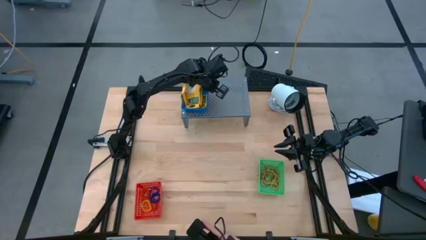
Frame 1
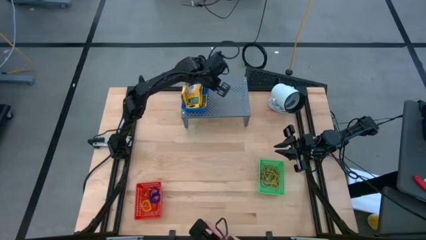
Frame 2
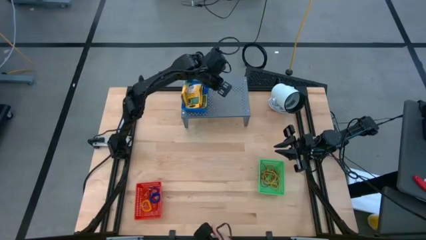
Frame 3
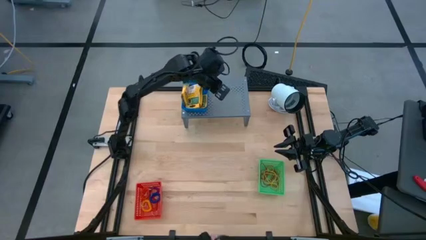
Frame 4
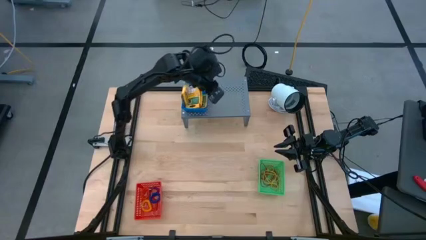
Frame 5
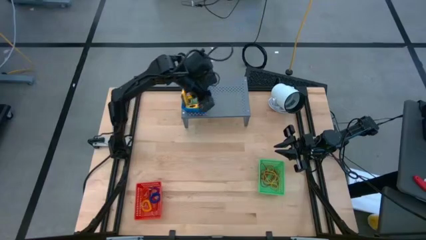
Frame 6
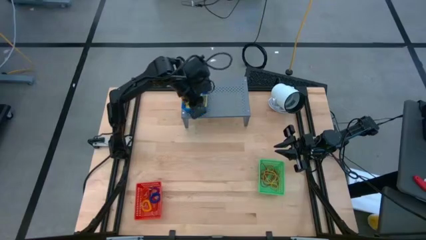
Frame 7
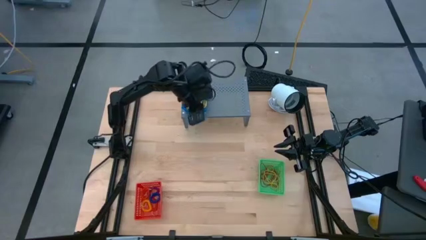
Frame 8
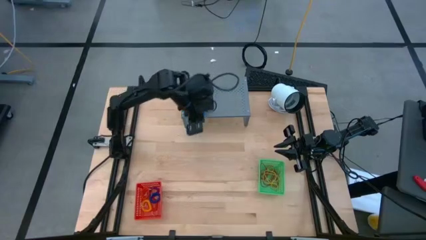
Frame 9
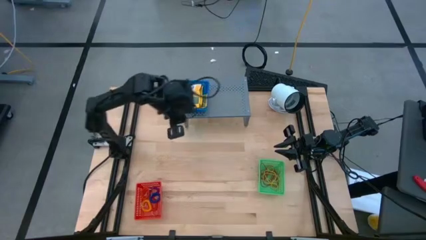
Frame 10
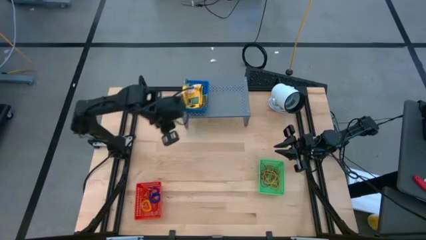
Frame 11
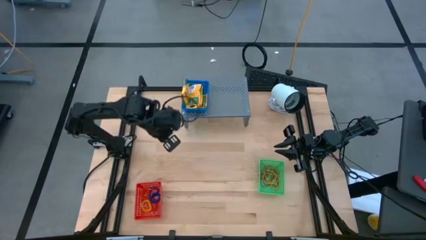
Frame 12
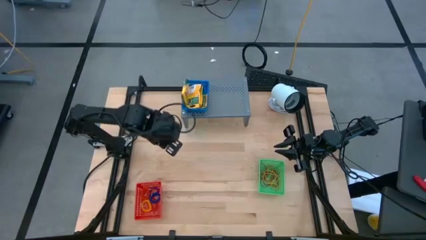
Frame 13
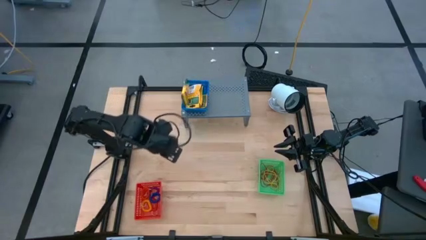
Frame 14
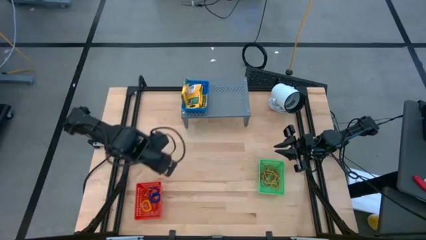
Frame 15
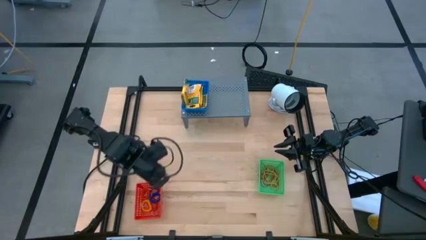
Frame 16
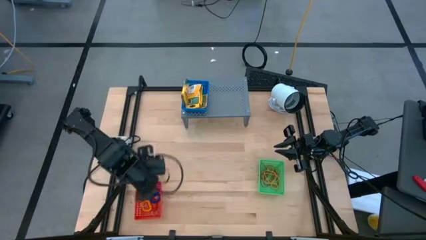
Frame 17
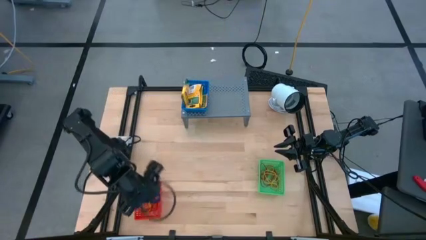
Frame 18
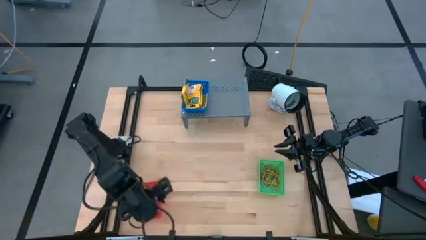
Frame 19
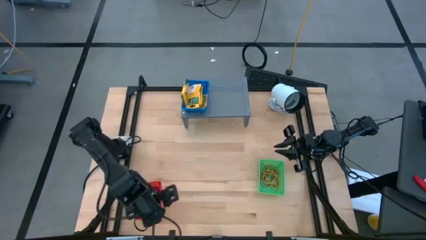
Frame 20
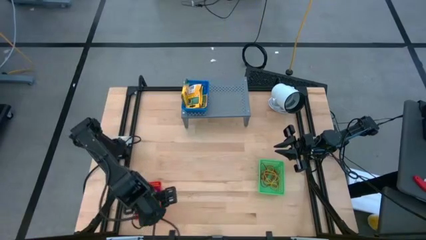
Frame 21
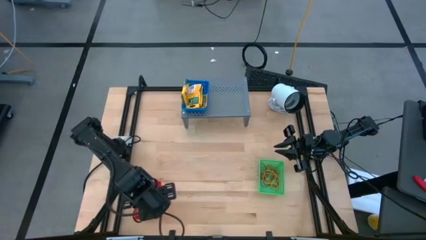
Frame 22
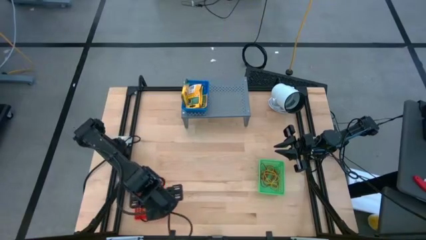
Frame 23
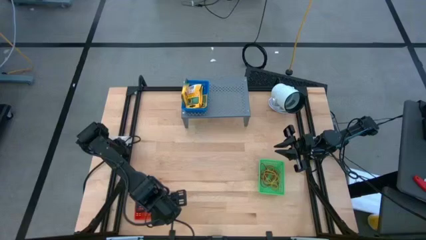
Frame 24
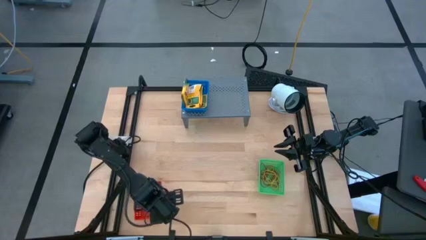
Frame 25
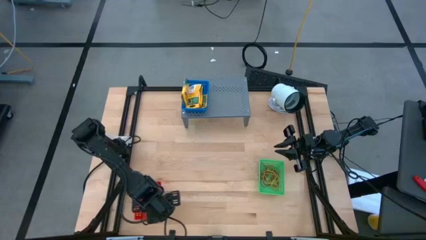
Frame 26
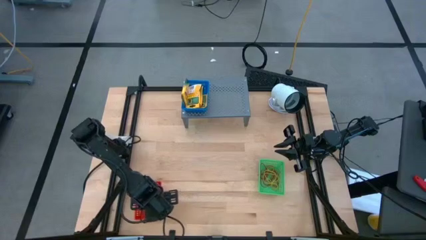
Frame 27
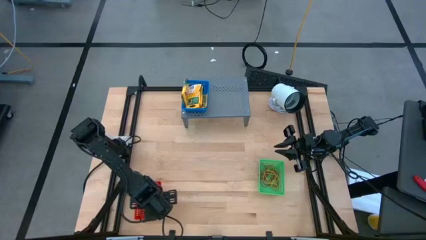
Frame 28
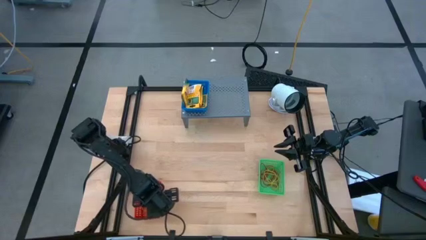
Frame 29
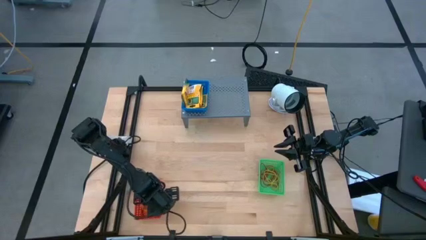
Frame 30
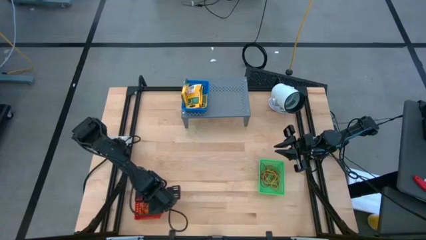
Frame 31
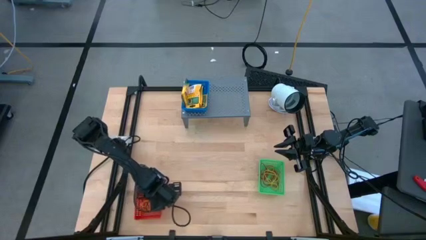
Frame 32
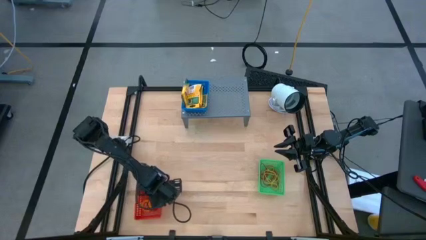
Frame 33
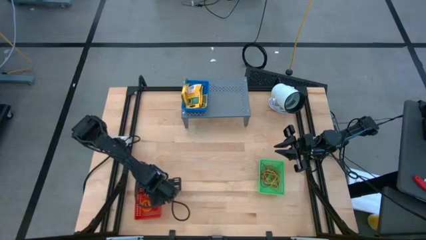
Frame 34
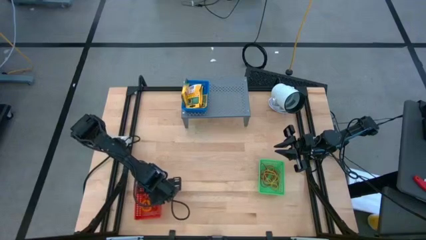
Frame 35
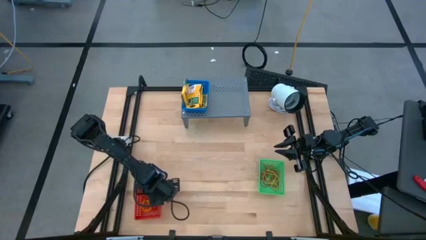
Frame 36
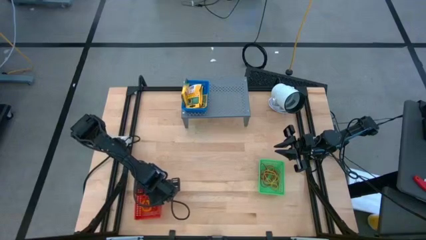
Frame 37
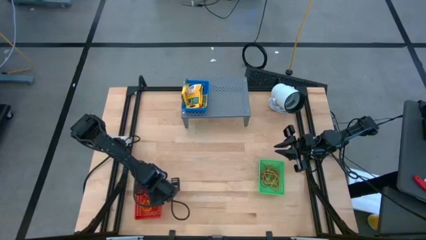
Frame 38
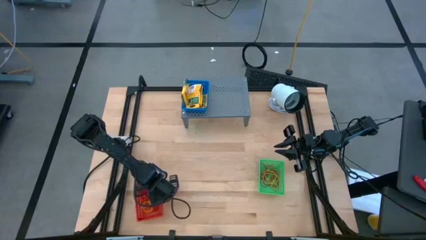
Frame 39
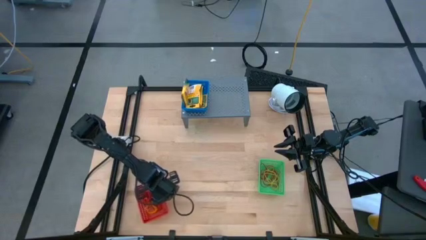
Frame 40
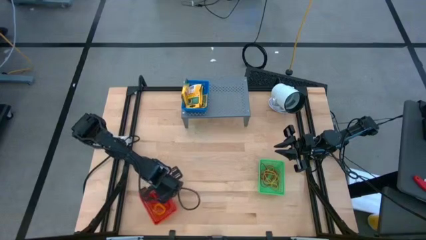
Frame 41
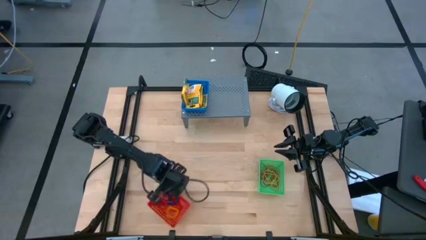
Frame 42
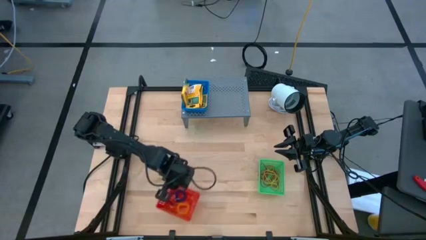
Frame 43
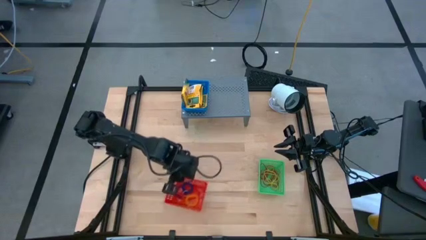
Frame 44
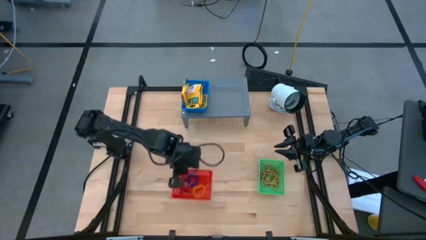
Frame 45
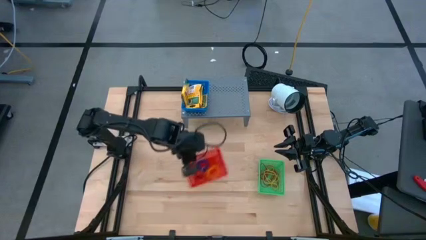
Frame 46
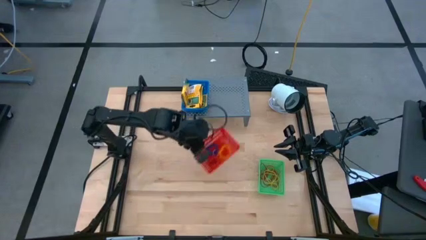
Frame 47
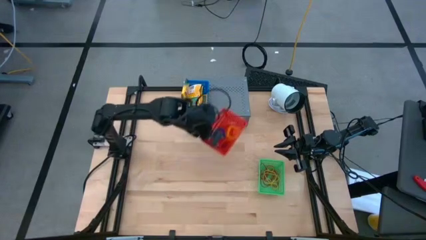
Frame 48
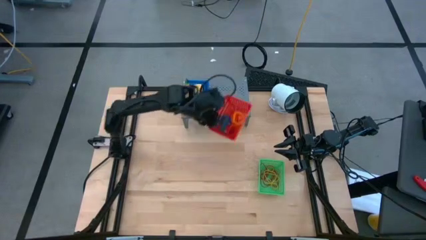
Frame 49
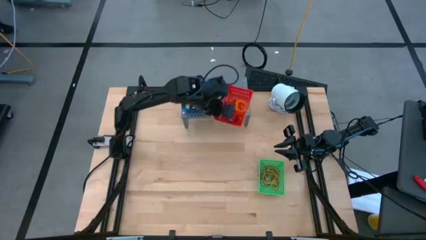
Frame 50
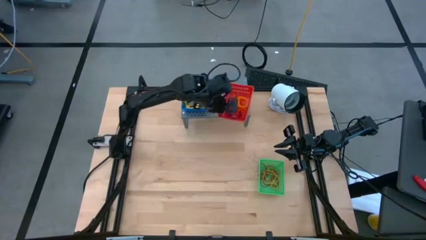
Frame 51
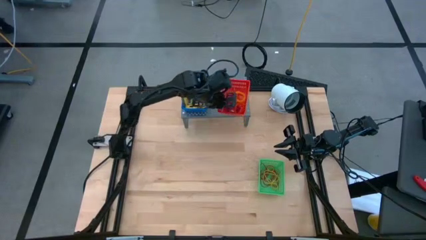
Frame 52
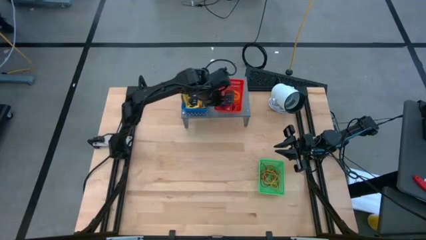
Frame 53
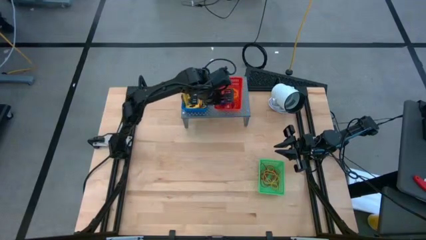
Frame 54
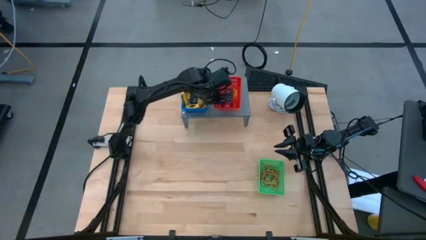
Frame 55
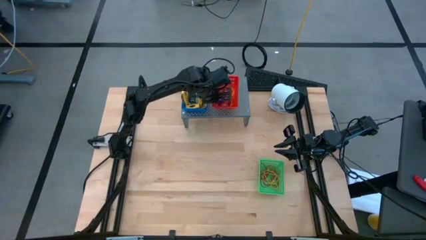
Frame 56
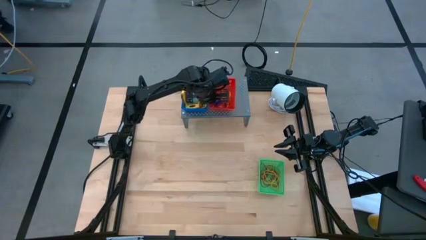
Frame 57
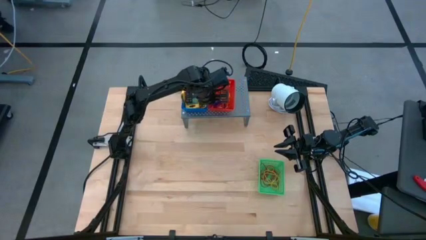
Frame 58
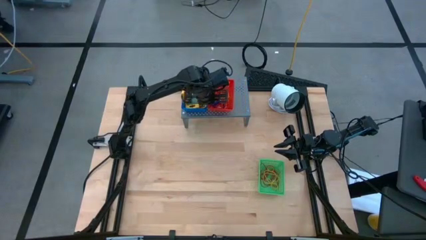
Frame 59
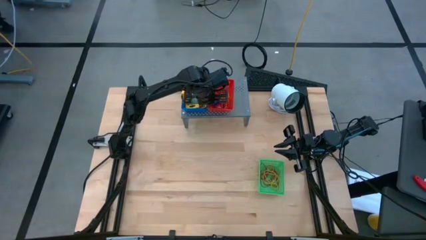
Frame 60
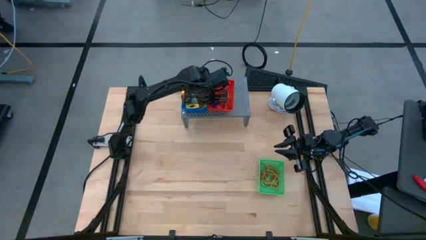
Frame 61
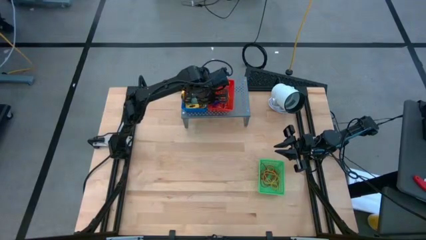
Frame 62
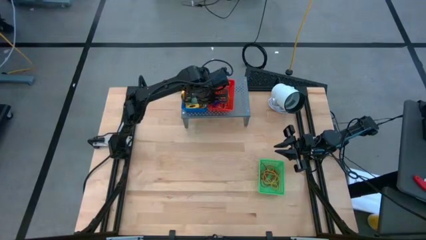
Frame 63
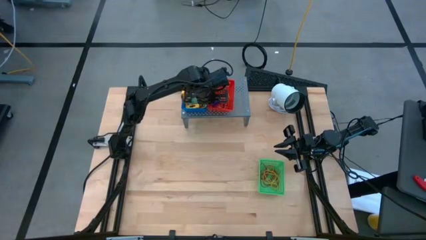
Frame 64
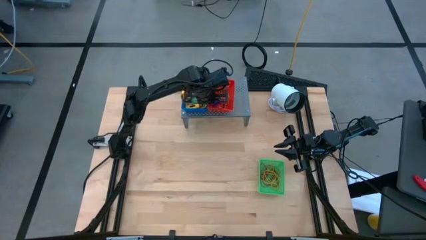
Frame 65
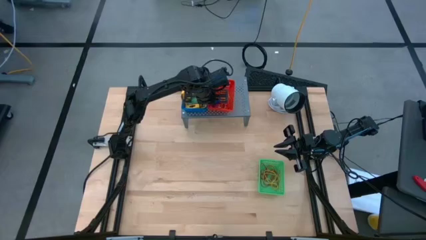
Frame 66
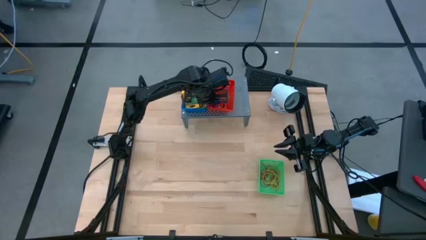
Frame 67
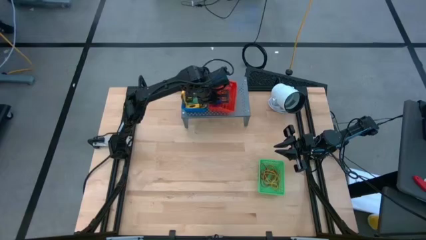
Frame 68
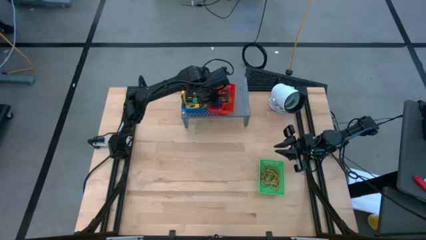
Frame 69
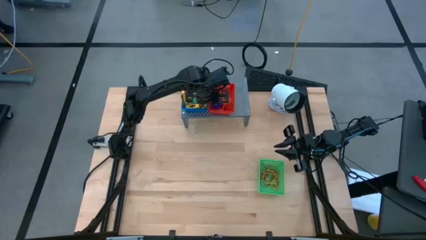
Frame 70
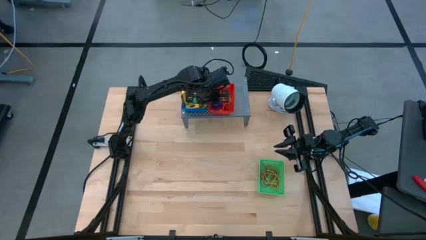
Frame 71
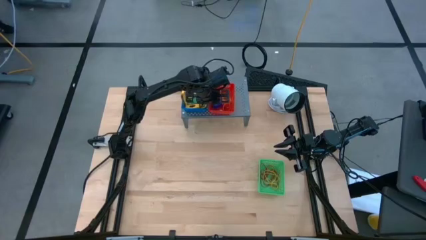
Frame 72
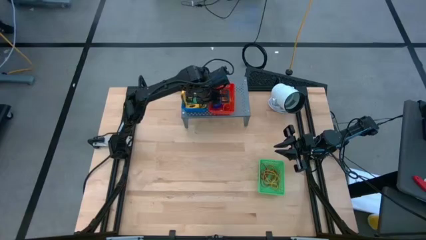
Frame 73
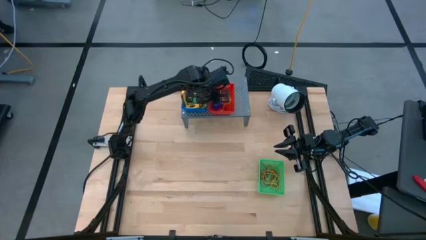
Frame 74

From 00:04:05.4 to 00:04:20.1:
Task: Pick & Place Office Desk Supplies
Put the red bin with spiral keychains on the shelf
